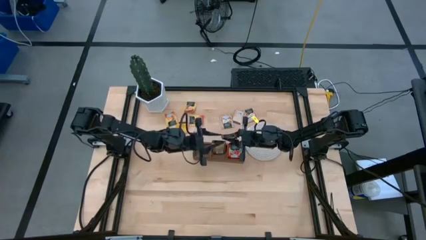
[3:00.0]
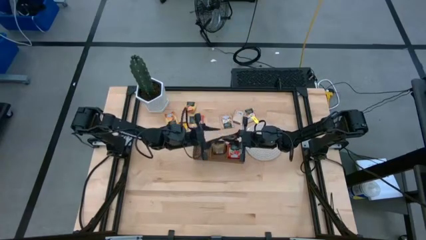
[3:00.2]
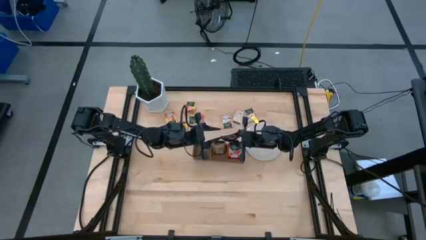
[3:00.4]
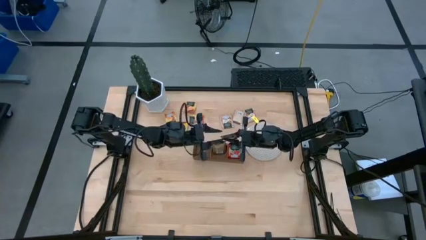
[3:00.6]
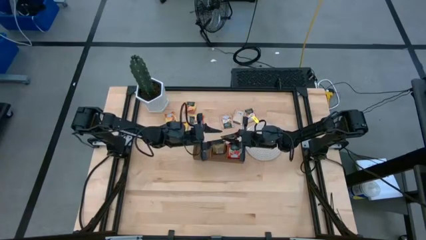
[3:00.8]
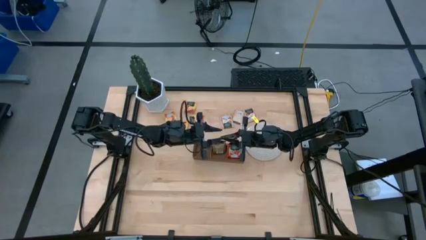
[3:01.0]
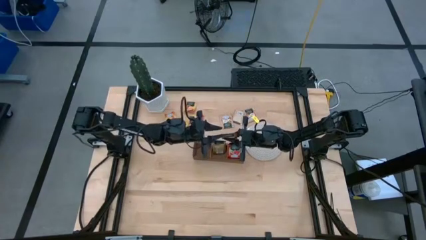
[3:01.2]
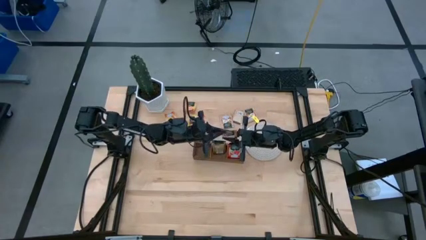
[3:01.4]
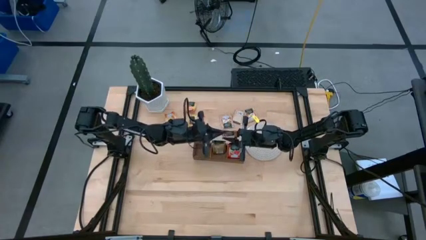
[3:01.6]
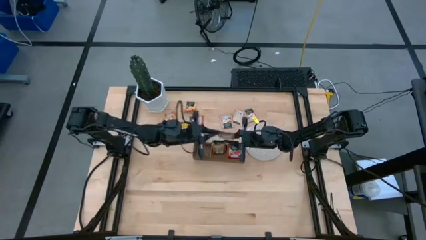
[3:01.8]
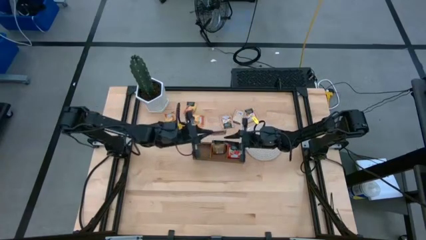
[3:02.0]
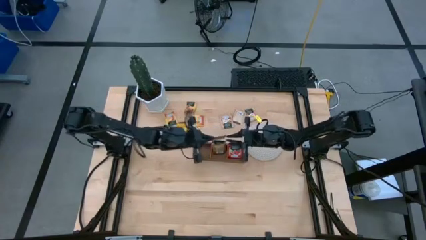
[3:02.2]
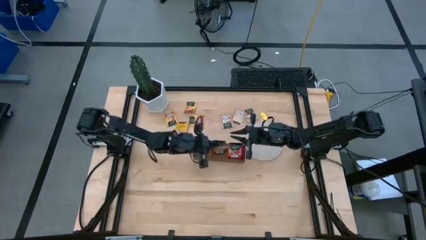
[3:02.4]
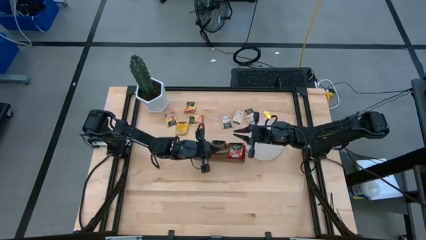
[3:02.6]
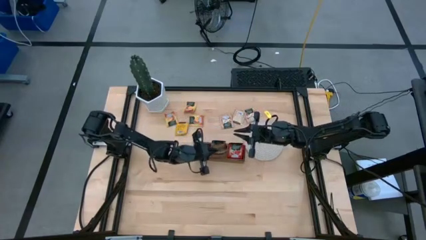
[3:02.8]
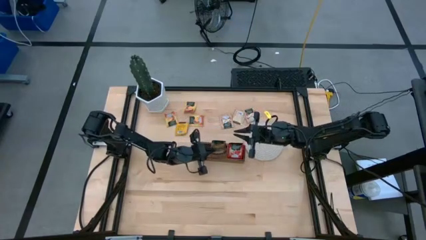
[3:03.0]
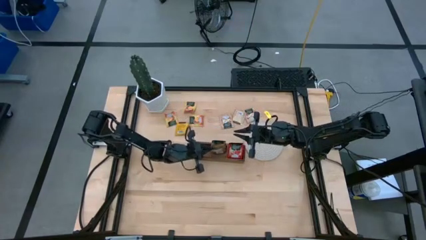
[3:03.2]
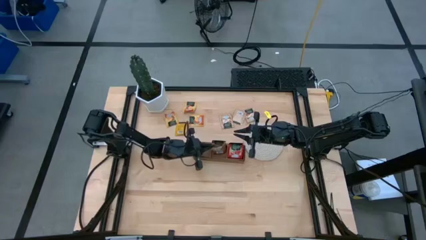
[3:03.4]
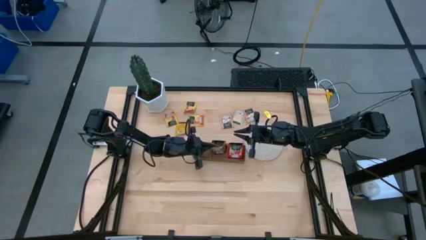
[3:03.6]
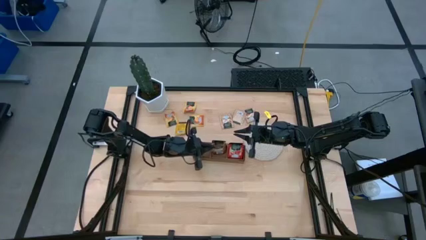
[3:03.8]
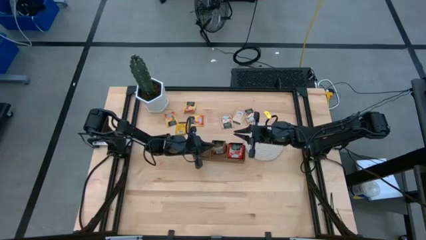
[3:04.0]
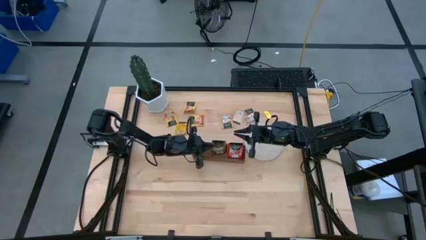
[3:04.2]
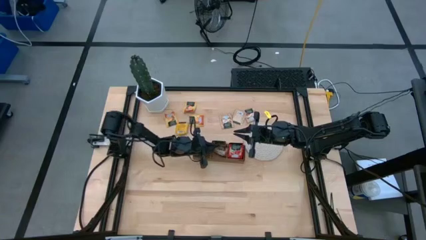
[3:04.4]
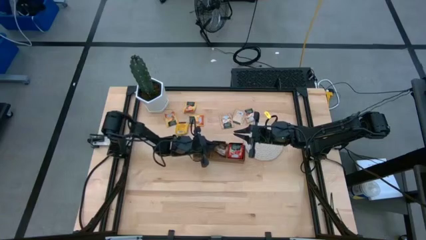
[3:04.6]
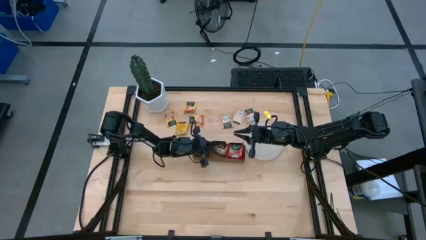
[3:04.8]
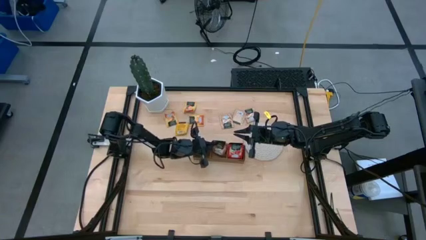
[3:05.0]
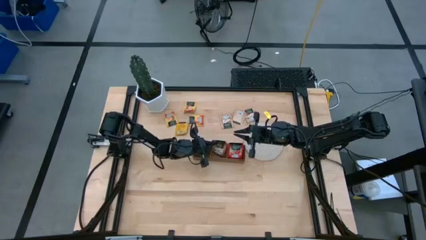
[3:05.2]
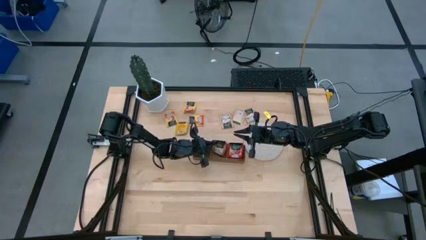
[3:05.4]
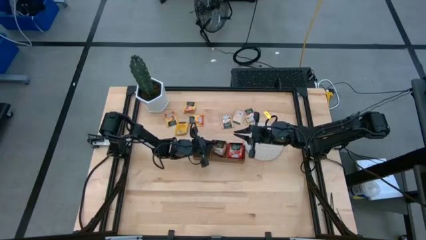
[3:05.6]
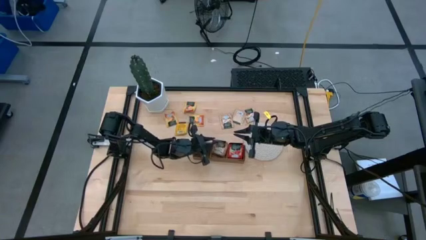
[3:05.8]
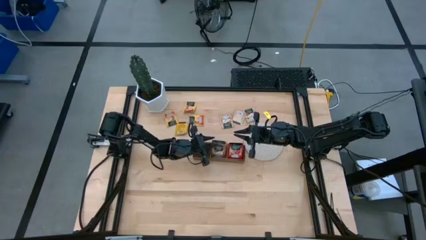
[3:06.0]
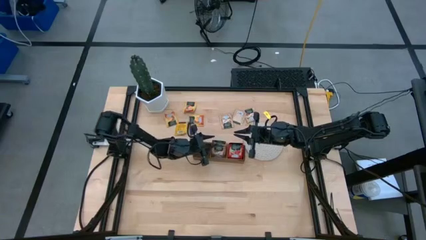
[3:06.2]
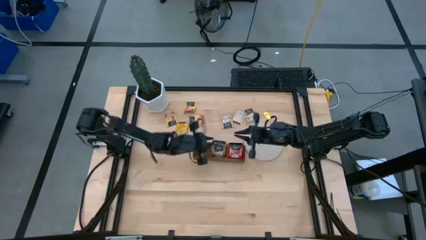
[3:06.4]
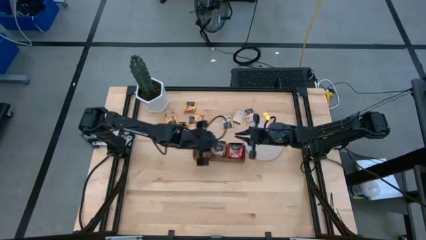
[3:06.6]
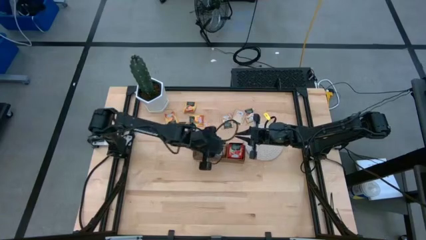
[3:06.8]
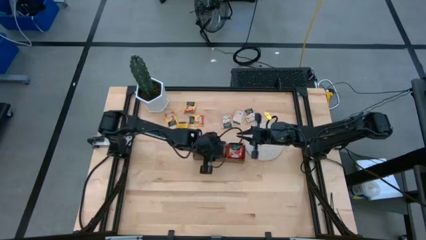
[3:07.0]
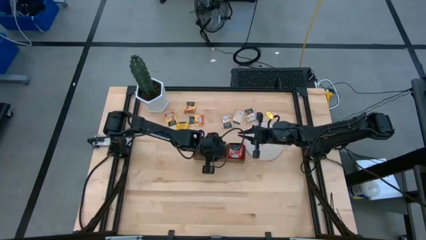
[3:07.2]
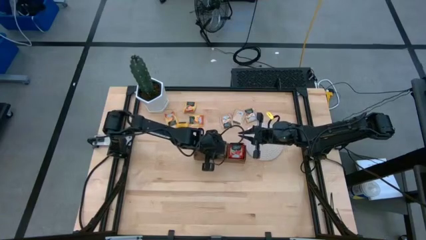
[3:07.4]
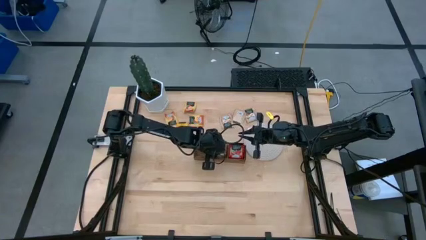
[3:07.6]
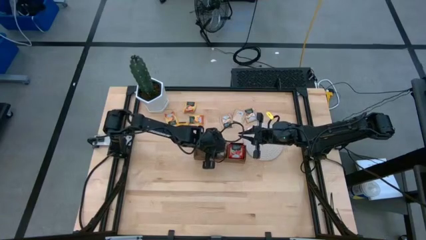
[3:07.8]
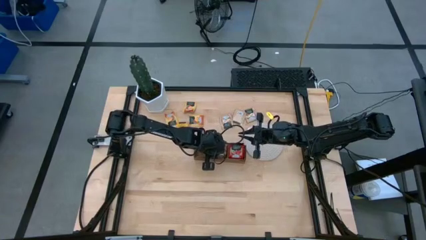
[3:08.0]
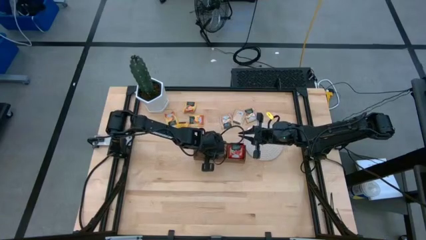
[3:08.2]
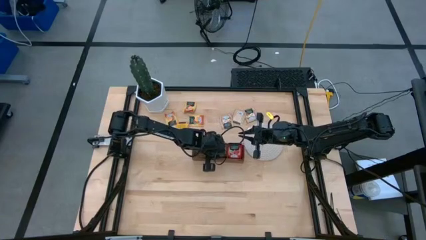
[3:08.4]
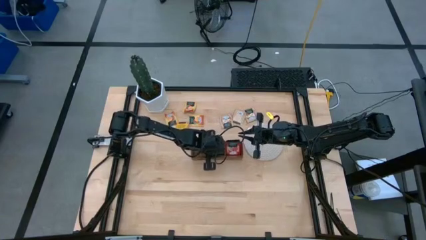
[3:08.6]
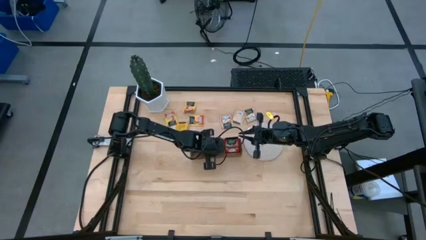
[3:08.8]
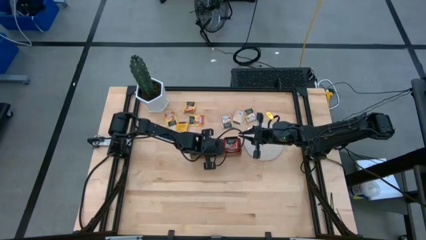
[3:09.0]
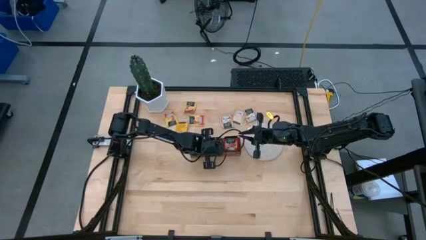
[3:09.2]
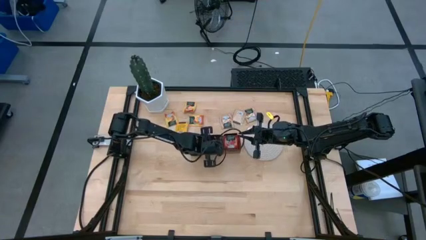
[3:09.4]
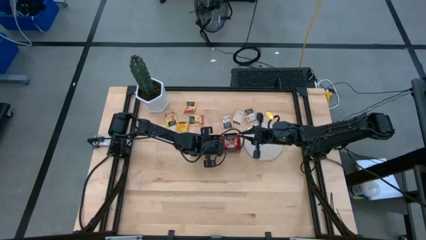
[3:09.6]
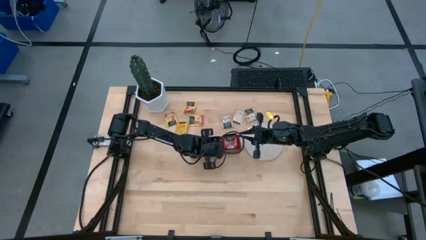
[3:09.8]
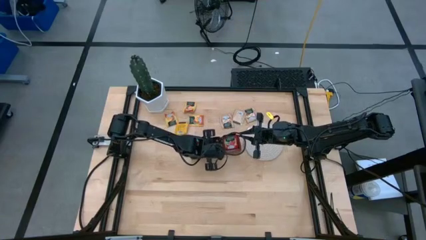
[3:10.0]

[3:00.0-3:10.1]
Task: Pick & Place Tea
Put the brown tea bag into the middle section of the wooden organizer

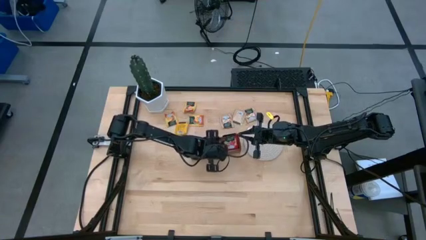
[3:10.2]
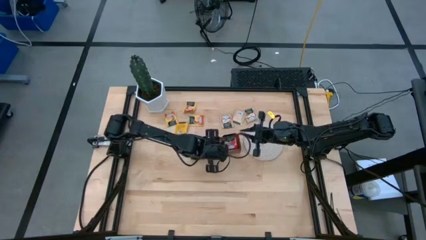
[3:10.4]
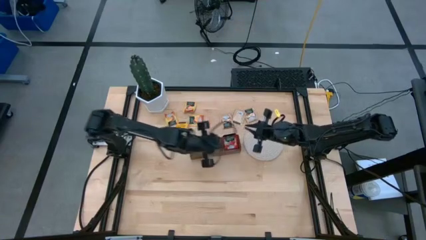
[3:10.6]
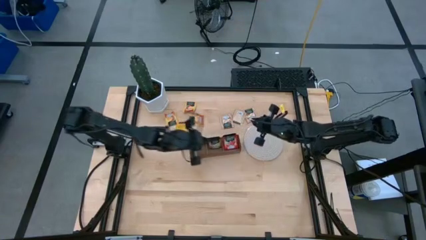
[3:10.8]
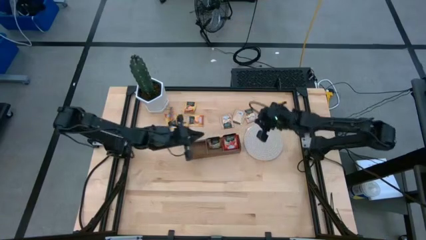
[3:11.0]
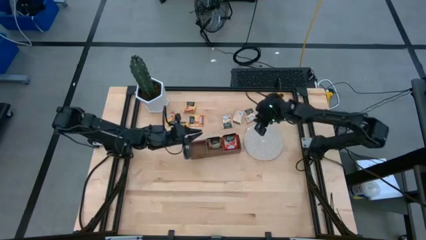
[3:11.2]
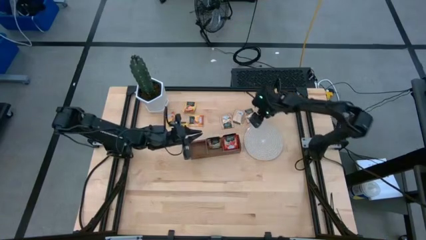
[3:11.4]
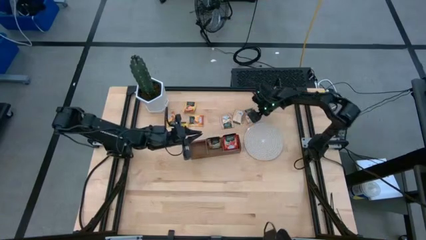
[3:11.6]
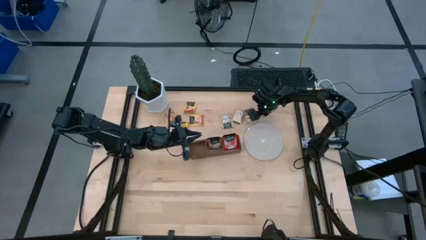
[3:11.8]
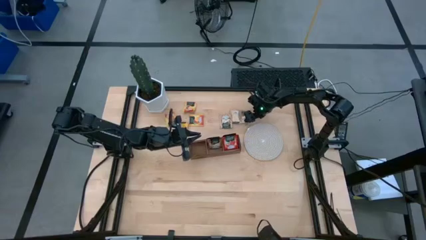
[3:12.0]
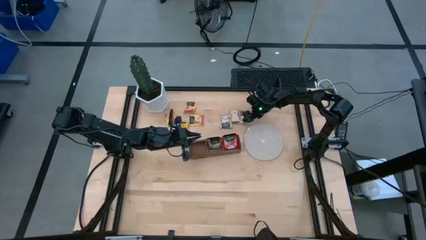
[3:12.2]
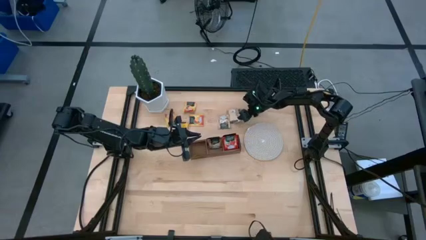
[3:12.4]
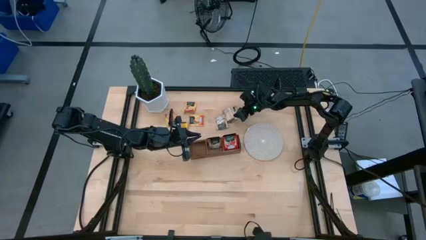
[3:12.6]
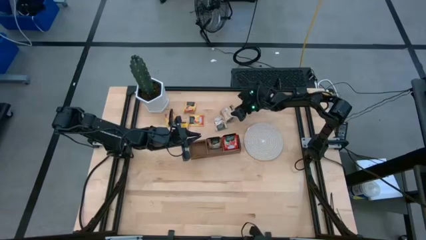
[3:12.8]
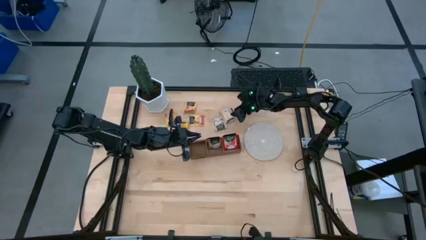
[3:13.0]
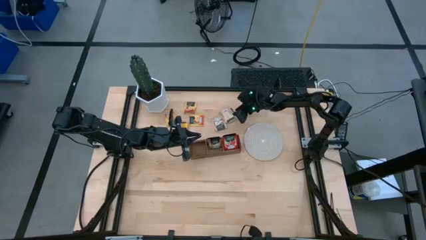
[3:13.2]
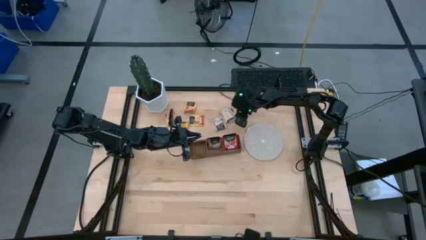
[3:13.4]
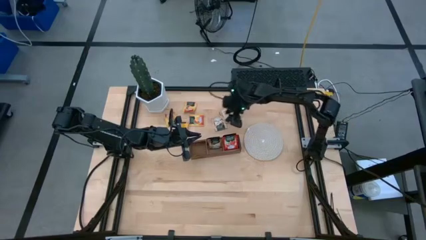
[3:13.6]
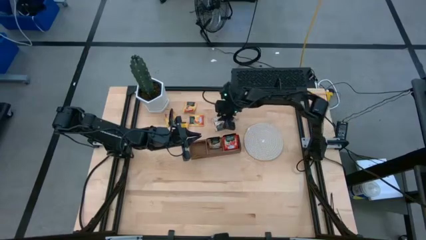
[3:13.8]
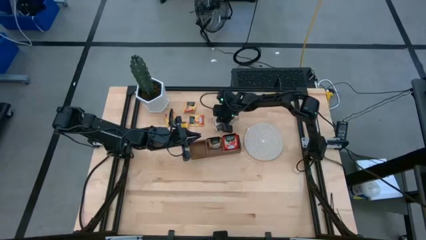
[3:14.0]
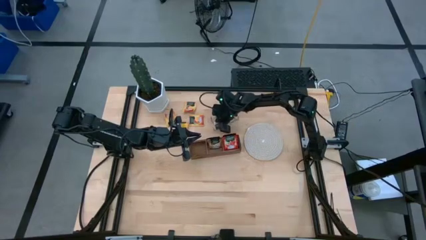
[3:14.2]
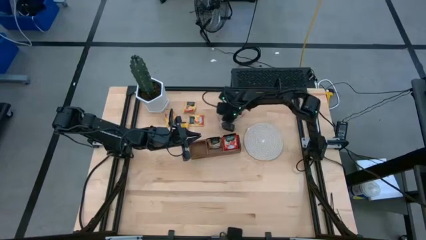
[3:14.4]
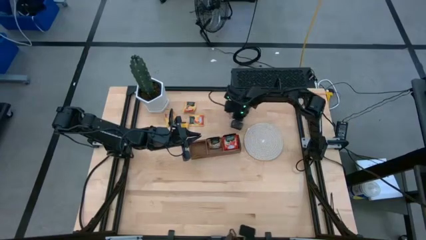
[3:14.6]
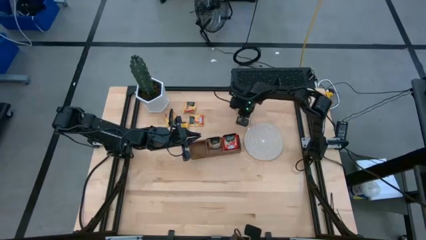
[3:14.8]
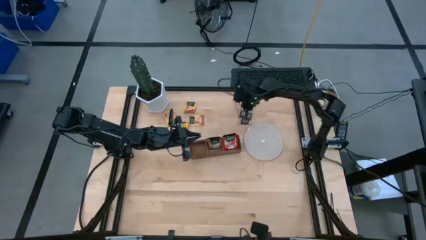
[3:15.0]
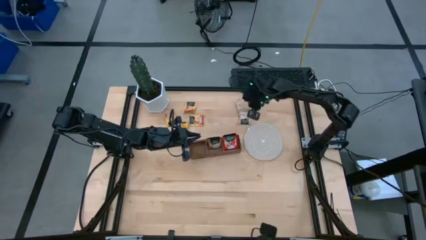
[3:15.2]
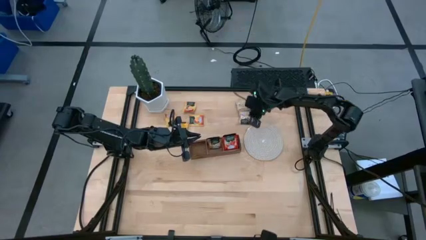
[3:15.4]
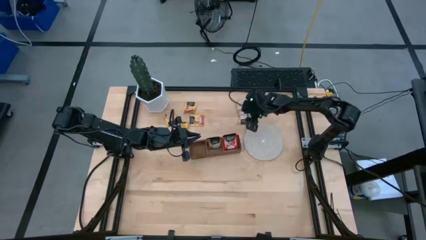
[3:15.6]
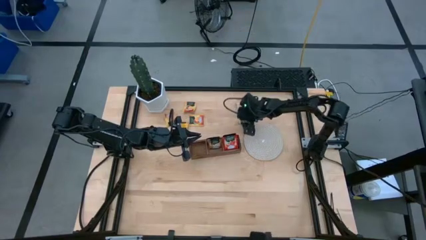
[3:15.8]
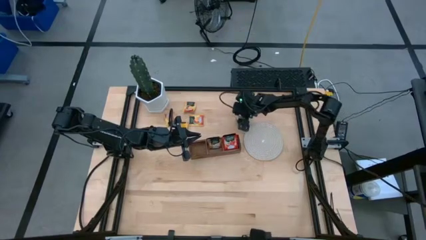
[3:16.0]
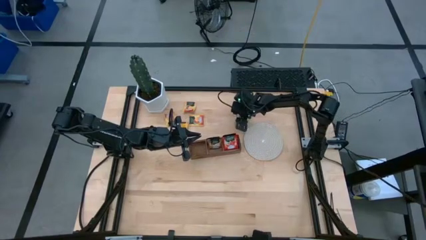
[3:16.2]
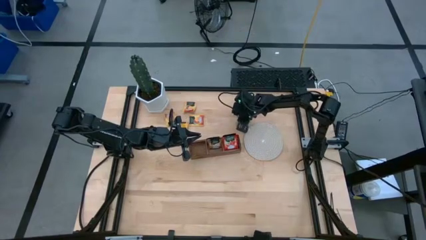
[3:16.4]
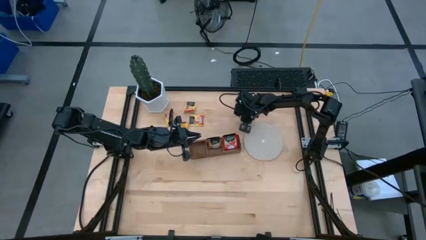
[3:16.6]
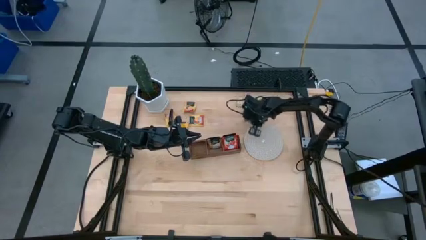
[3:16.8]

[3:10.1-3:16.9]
Put the brown tea bag into the middle section of the wooden organizer
